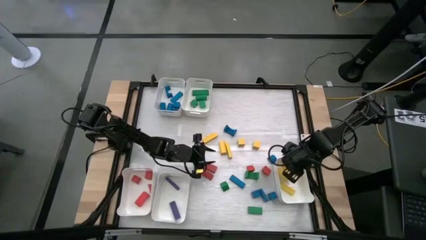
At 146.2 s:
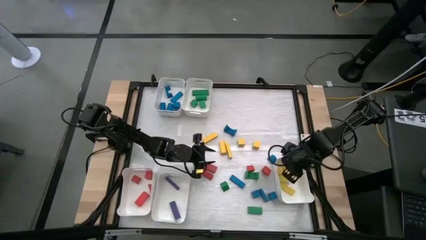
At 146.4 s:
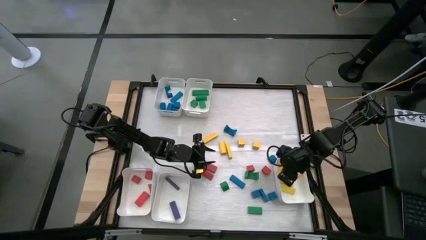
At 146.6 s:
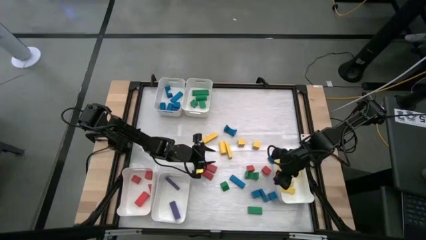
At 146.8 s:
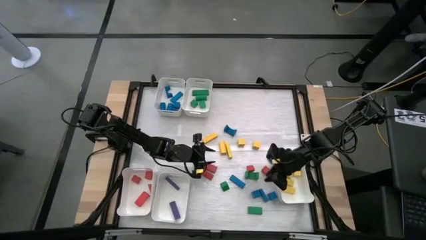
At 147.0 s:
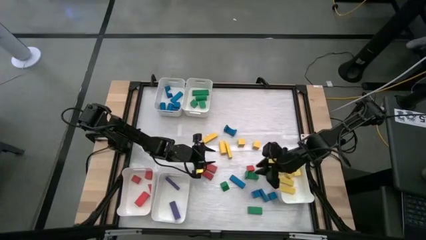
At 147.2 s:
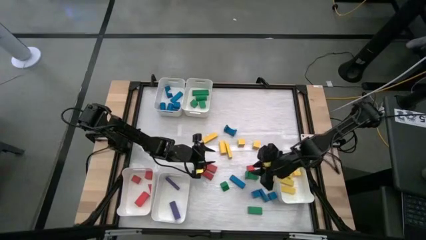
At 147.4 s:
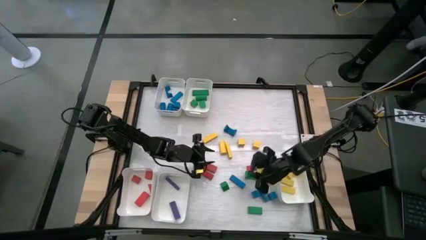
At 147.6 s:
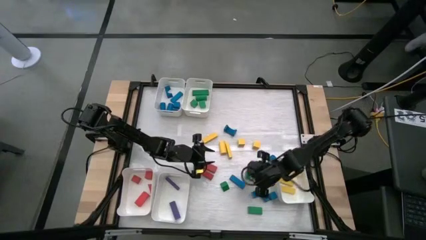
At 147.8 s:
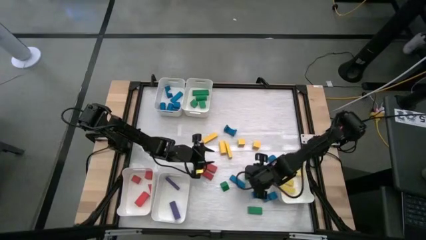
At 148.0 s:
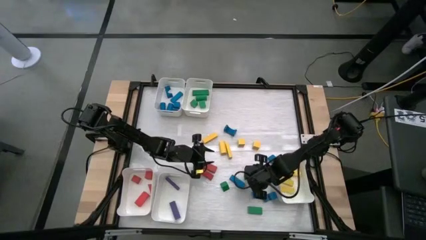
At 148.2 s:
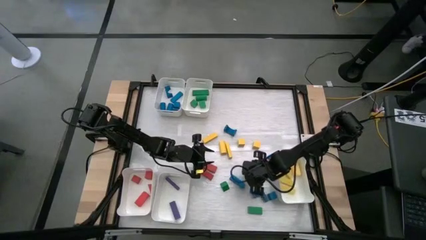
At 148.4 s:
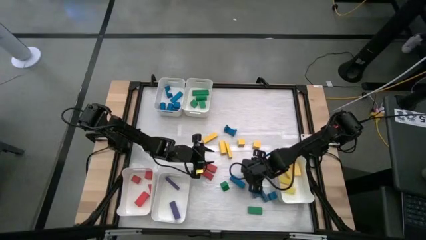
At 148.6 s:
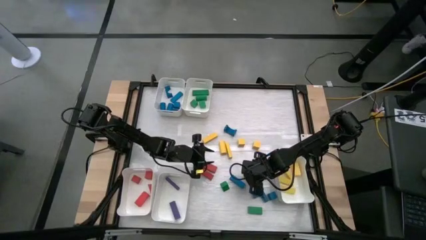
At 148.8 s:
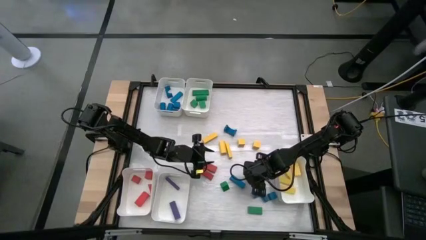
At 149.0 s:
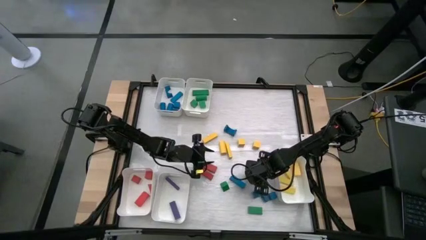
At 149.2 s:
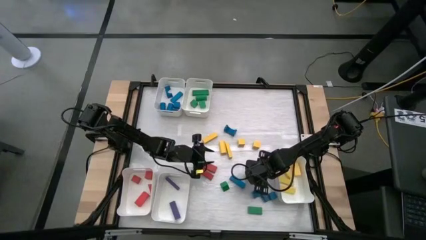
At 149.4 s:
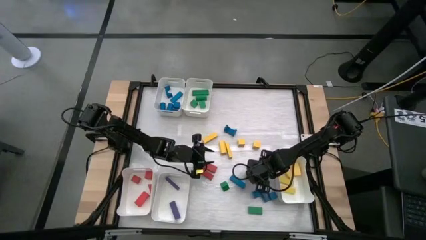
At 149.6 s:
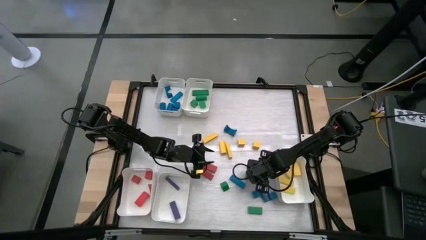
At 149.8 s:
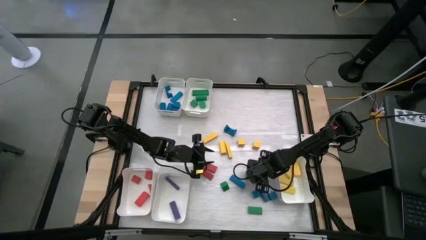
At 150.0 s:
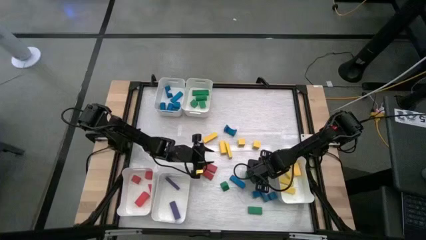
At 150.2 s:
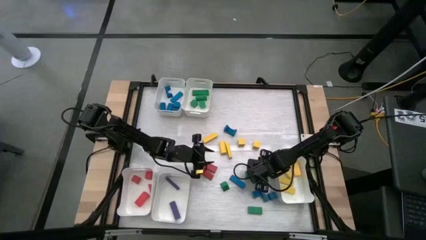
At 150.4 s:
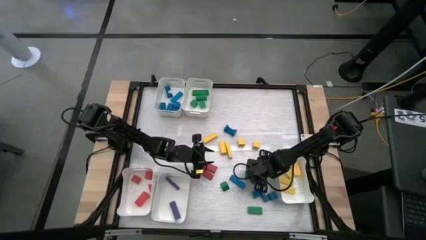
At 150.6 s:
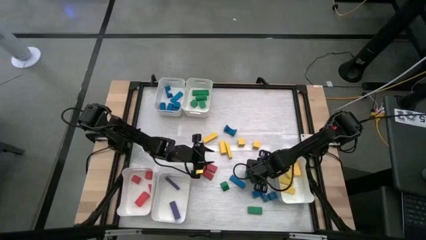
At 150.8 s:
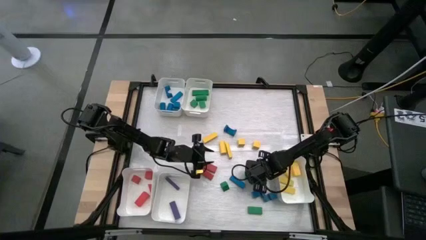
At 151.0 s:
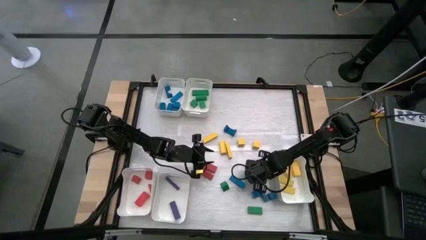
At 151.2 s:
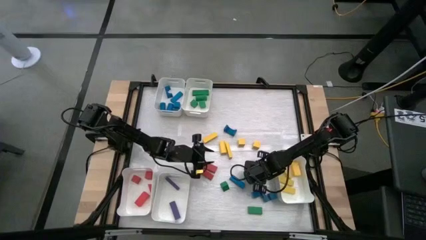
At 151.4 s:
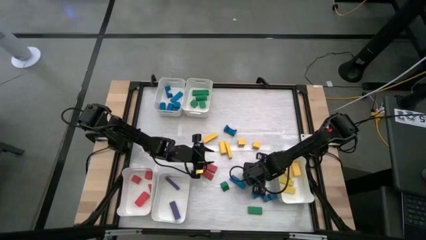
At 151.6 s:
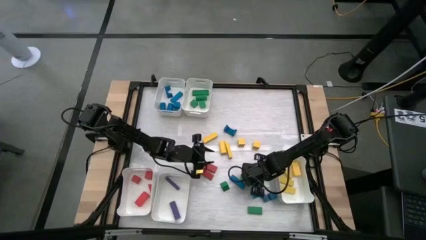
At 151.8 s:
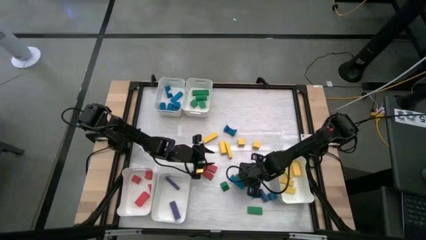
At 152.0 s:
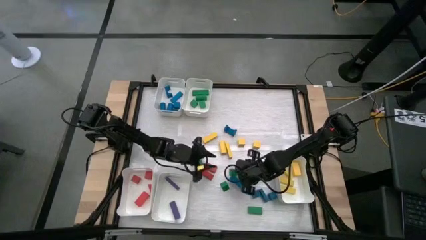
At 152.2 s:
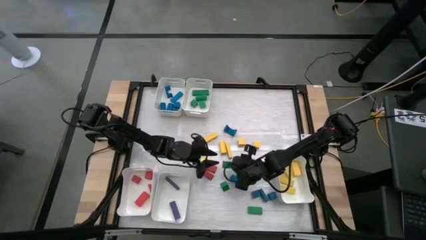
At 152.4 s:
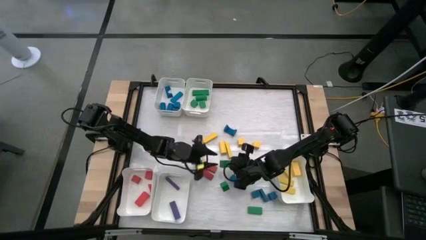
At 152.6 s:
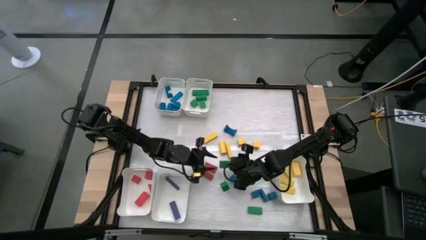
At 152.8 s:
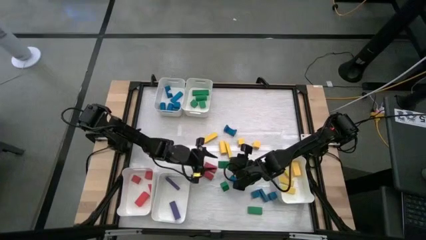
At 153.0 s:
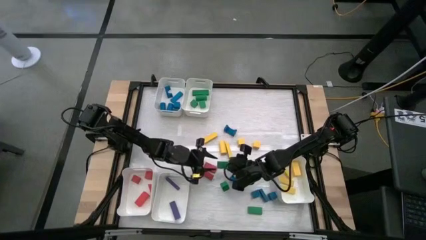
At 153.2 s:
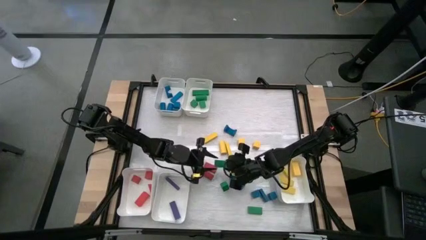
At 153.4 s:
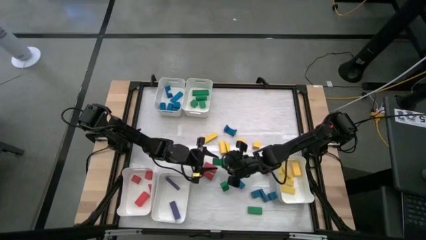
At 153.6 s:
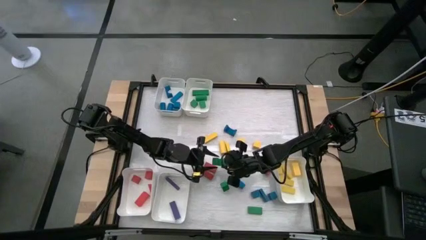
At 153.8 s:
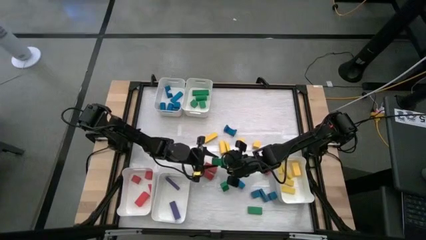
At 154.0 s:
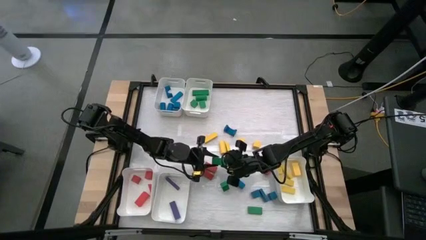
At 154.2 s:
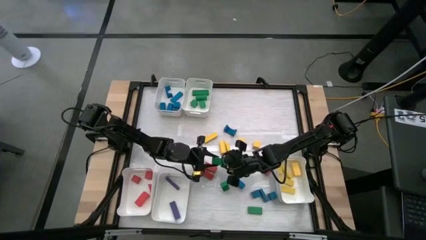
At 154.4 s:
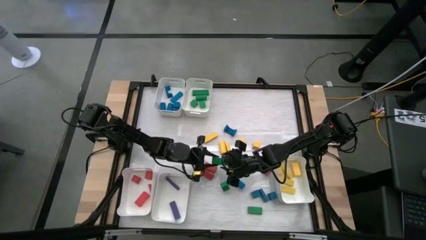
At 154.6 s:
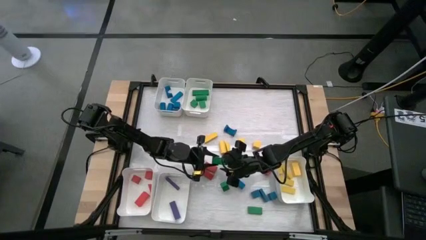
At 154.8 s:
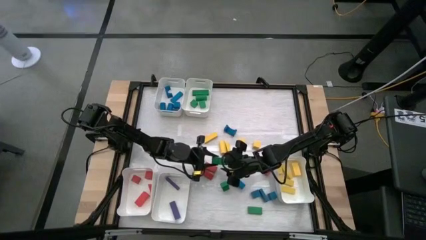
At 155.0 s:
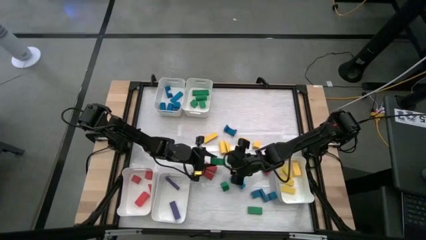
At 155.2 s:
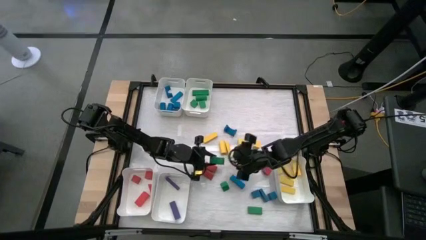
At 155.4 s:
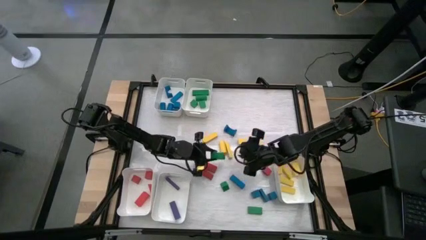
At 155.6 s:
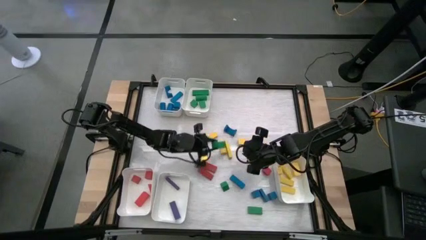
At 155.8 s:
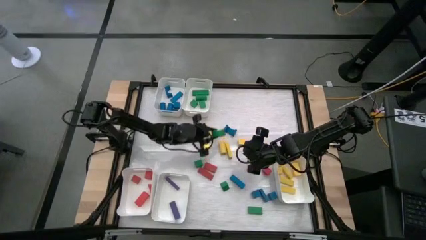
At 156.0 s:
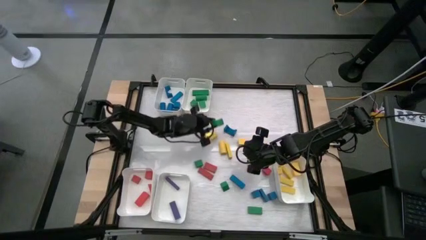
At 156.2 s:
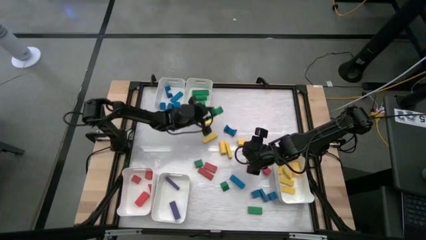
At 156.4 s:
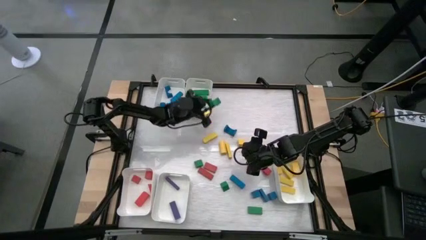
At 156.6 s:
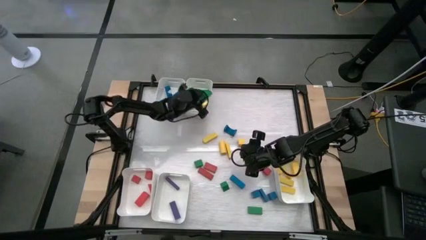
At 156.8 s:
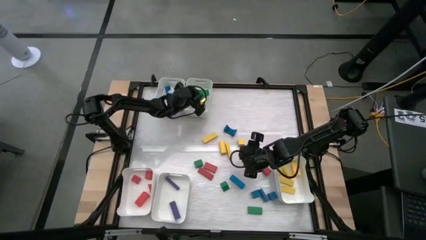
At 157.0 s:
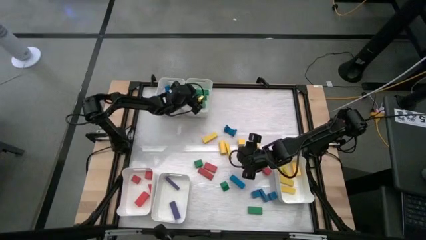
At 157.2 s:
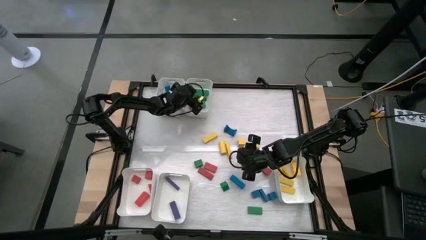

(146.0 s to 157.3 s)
Task: Sort blocks
Put the green block into the top right white bin

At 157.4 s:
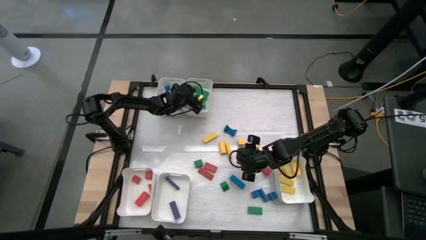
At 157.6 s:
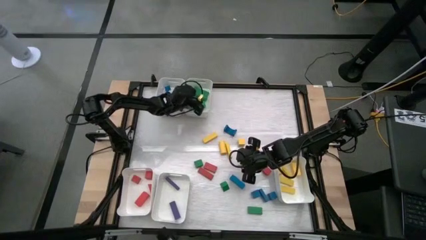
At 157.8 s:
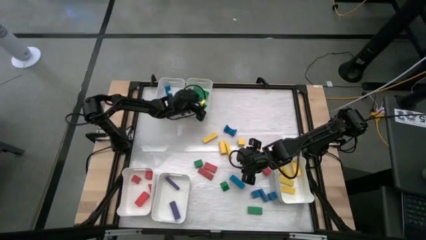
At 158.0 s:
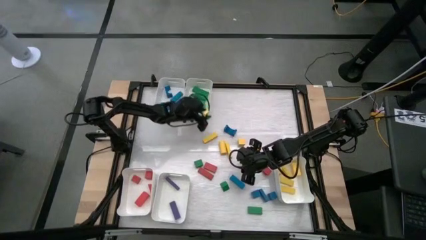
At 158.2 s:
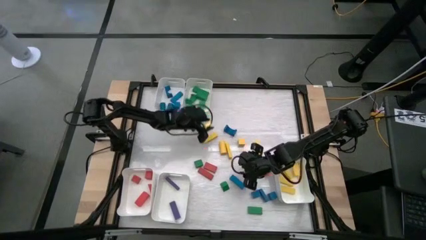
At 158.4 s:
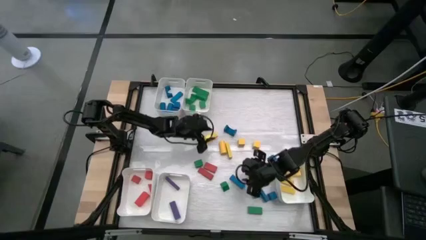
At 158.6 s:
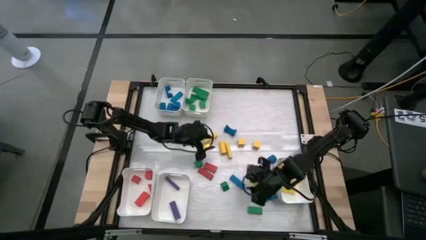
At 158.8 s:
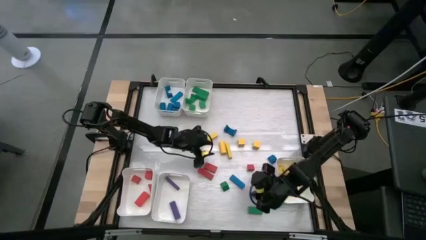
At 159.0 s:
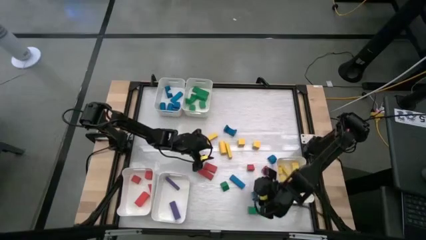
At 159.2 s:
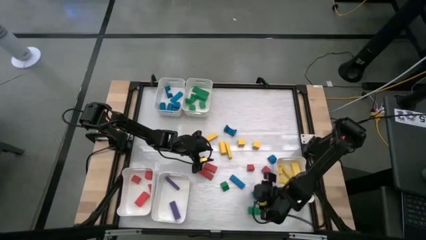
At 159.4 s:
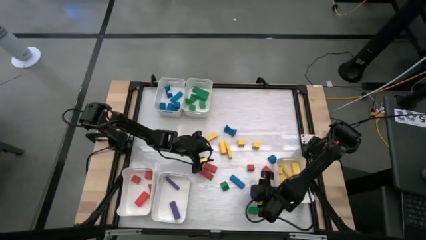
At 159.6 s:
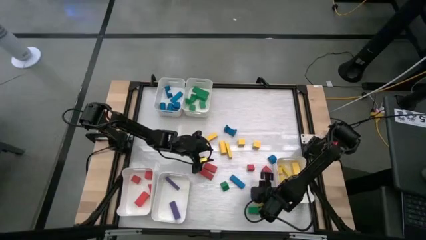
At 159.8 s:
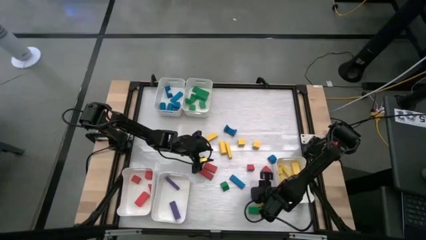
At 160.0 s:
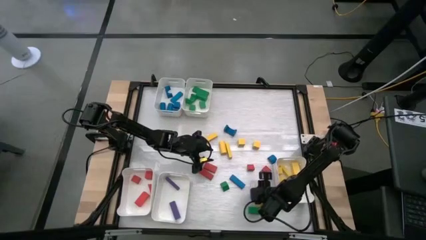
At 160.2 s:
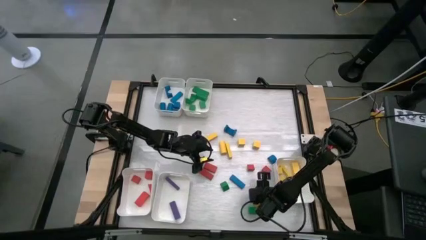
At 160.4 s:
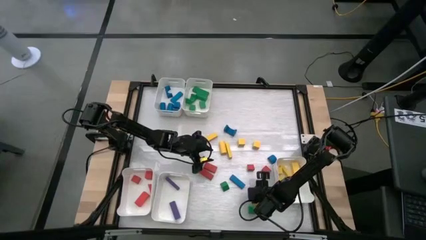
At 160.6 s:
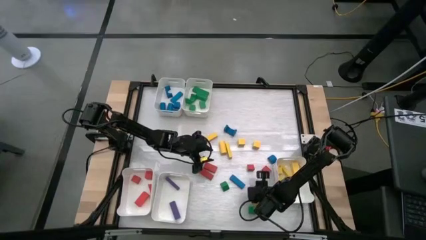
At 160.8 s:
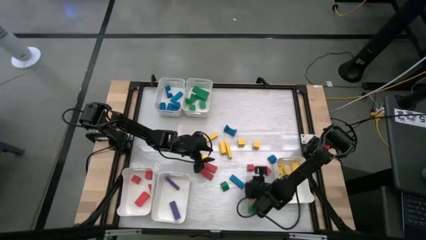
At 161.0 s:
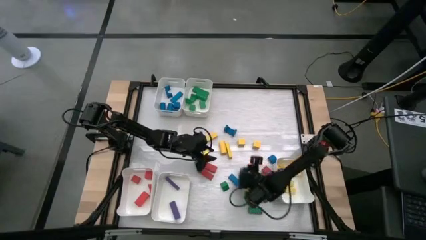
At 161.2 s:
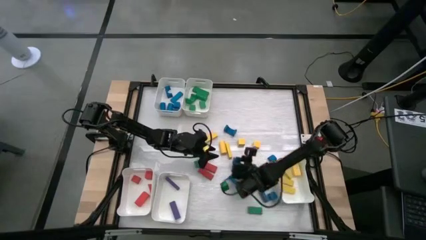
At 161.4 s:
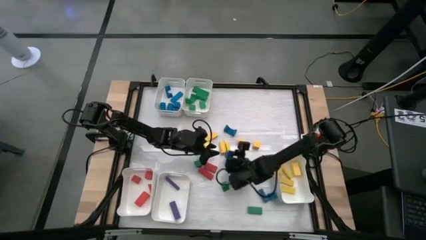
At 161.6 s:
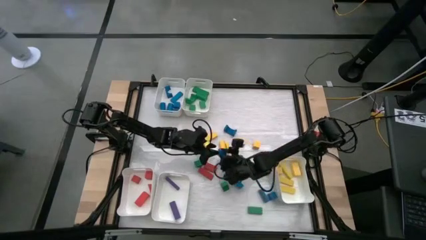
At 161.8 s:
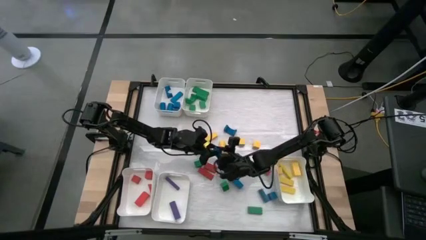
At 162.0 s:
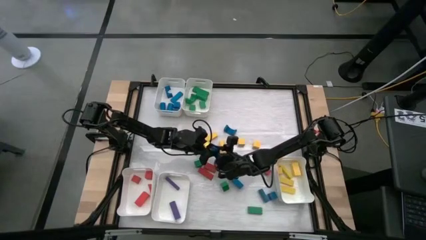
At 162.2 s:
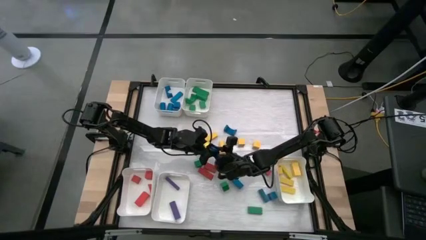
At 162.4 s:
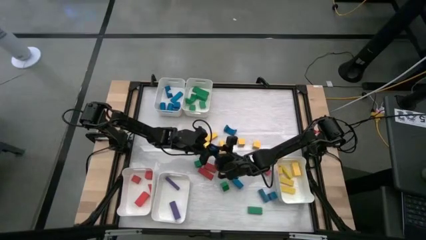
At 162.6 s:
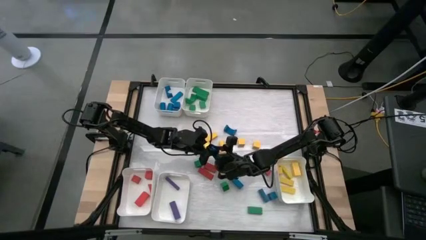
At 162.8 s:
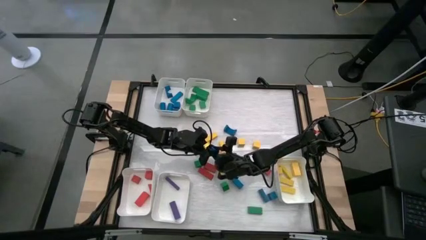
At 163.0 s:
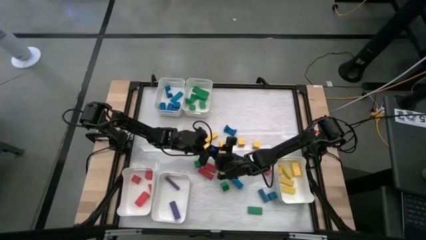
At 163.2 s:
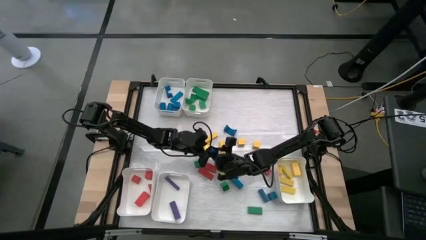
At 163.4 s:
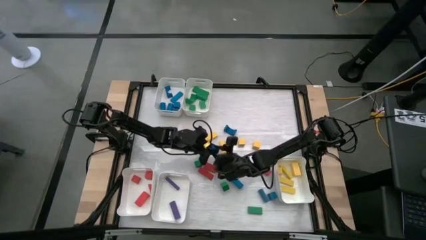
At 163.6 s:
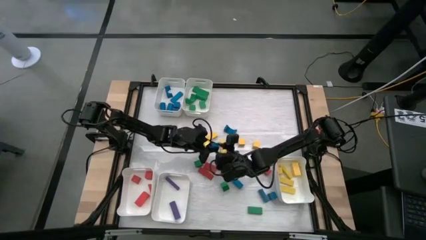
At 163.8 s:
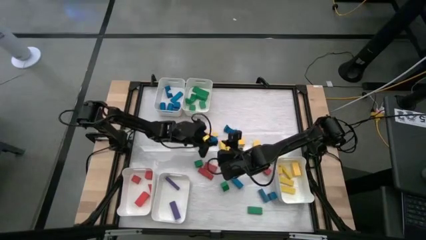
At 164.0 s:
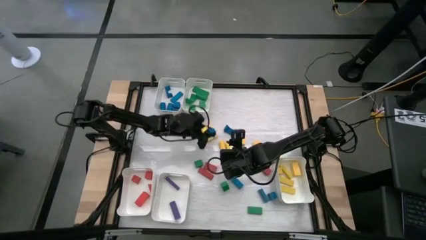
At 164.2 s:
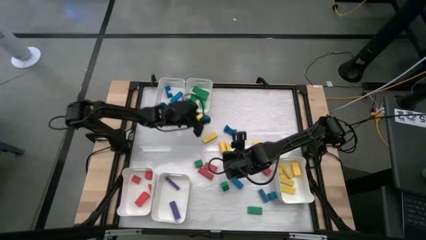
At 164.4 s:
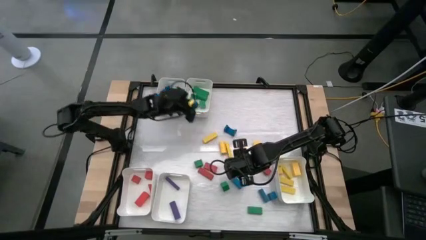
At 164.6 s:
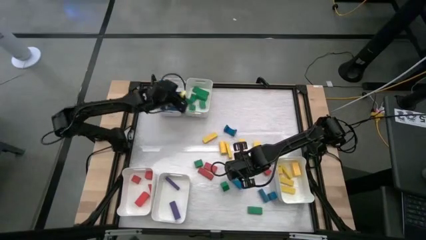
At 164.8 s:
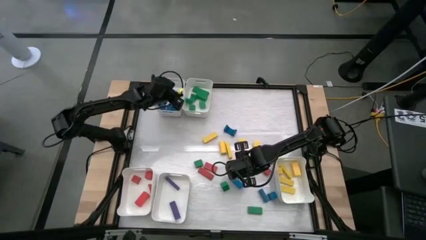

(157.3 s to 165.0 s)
Put the blue block into the top left white bin
